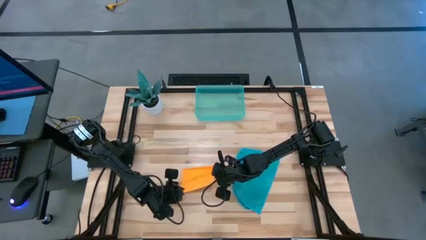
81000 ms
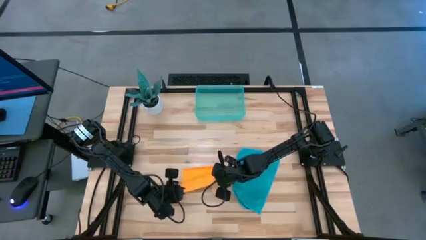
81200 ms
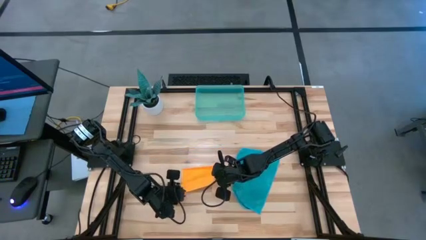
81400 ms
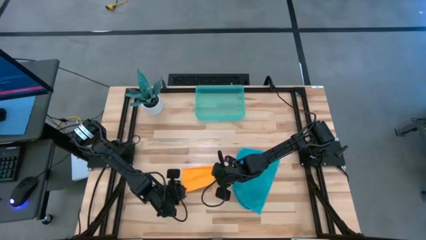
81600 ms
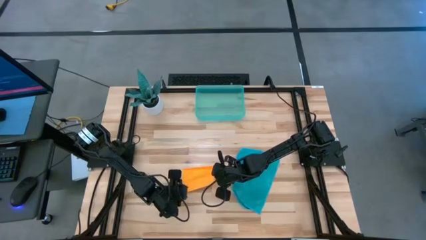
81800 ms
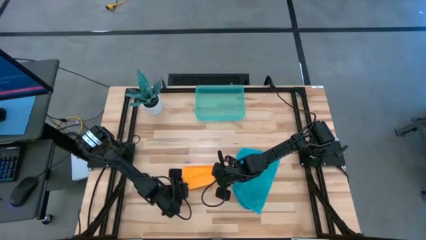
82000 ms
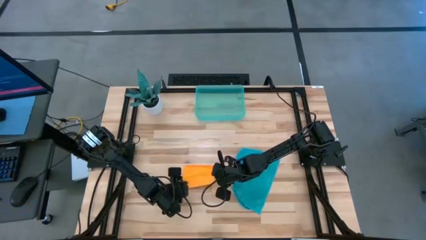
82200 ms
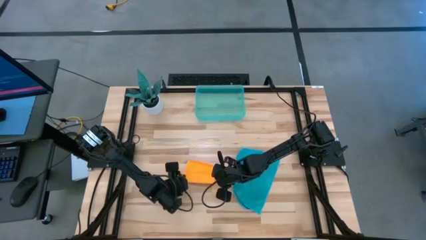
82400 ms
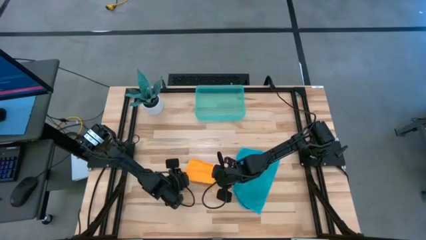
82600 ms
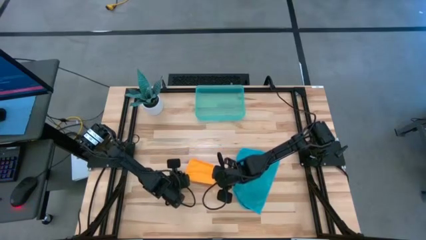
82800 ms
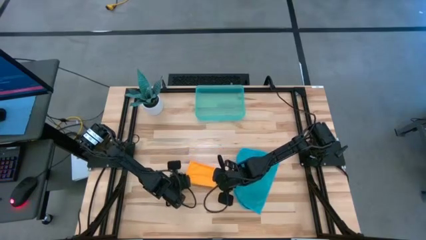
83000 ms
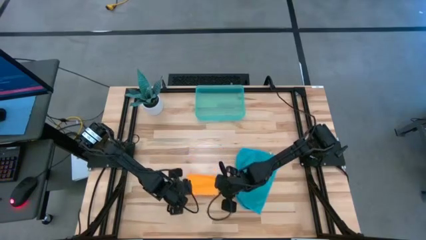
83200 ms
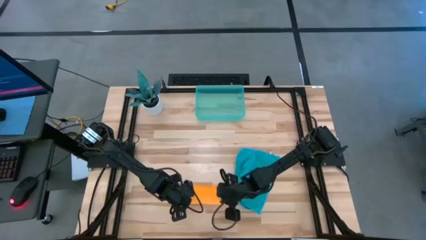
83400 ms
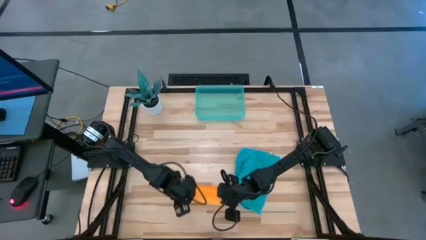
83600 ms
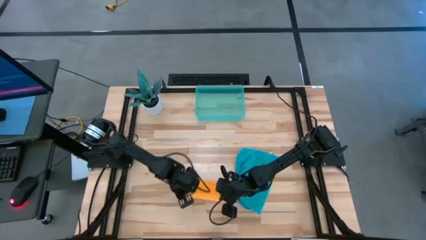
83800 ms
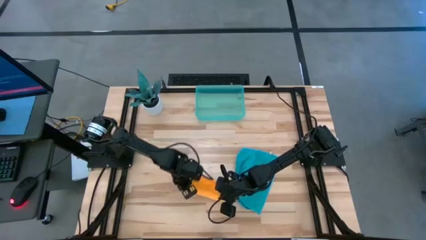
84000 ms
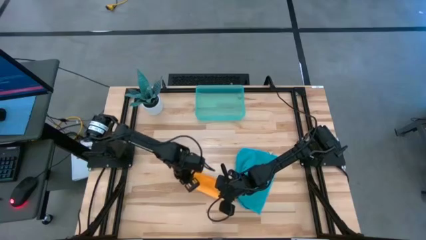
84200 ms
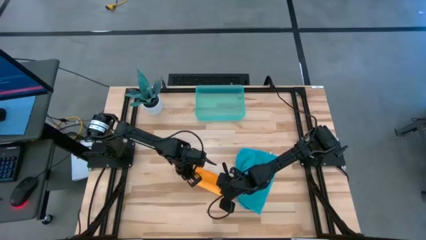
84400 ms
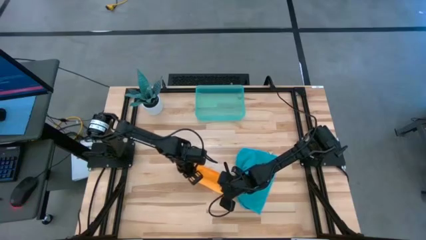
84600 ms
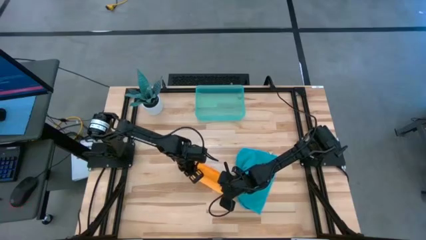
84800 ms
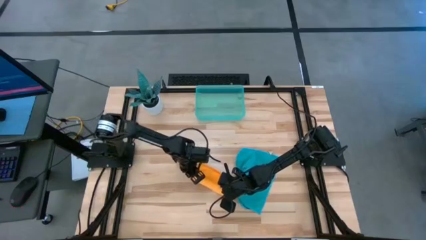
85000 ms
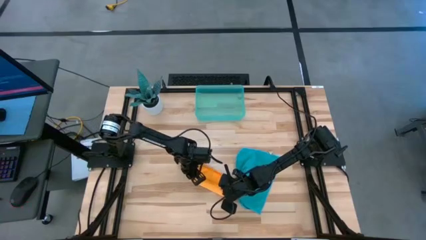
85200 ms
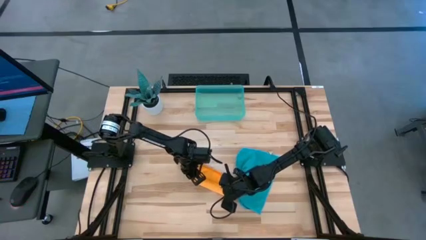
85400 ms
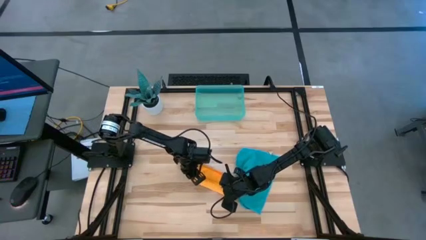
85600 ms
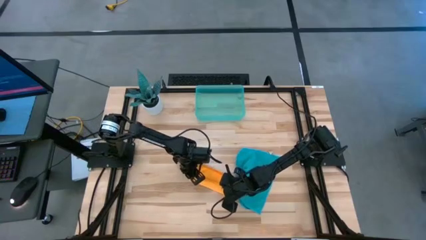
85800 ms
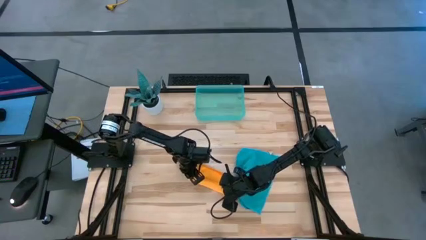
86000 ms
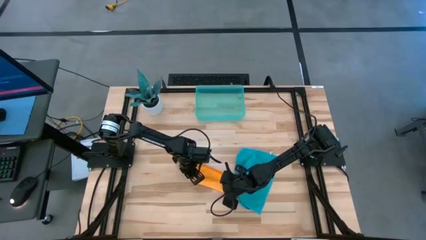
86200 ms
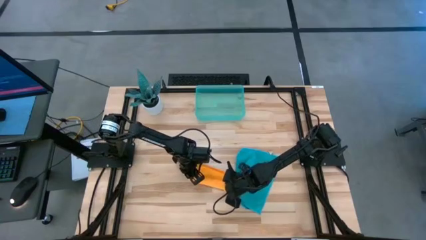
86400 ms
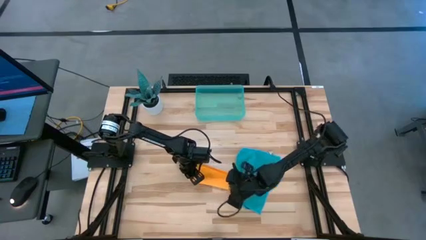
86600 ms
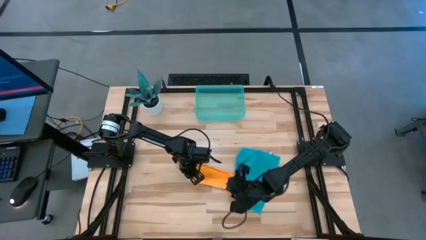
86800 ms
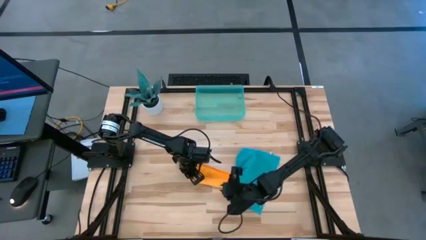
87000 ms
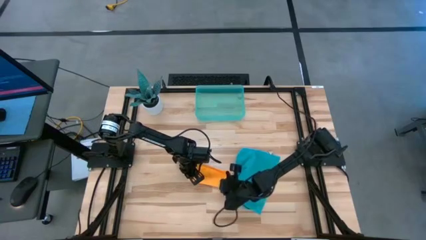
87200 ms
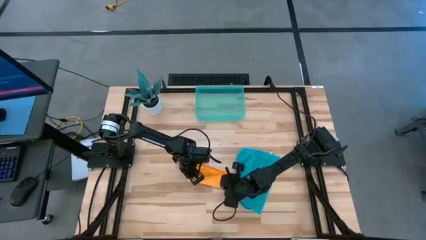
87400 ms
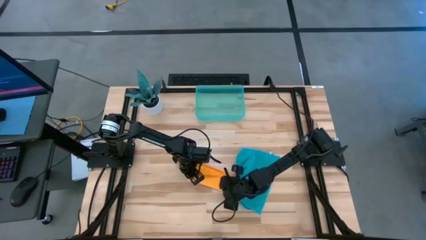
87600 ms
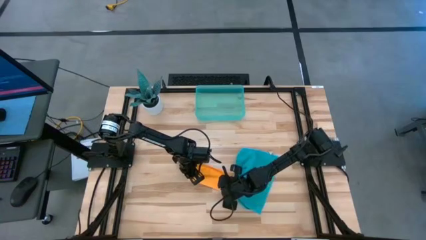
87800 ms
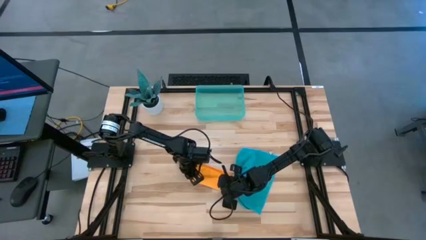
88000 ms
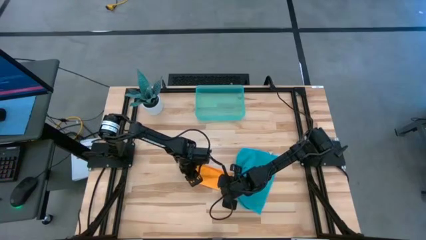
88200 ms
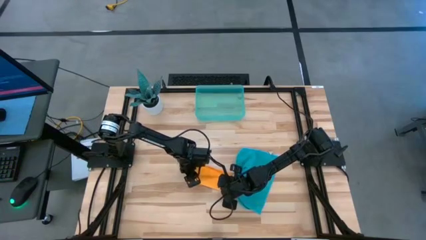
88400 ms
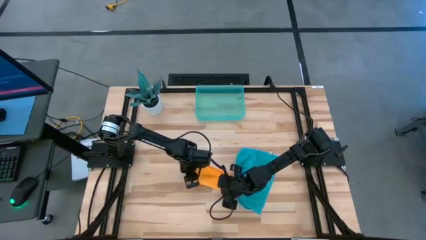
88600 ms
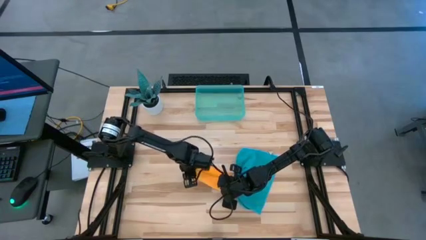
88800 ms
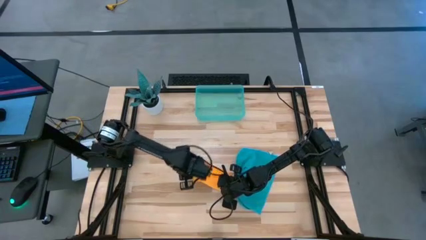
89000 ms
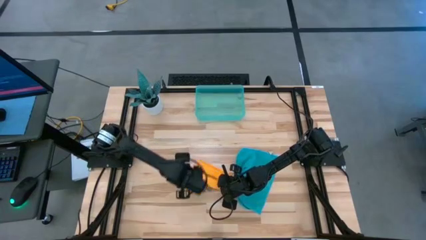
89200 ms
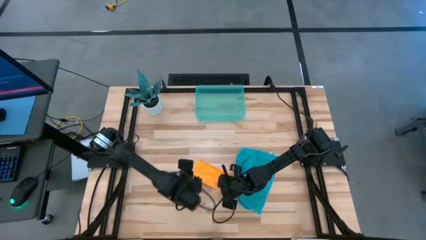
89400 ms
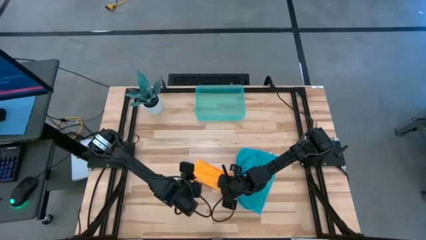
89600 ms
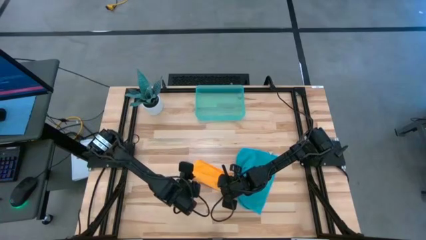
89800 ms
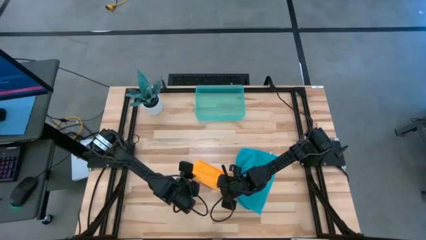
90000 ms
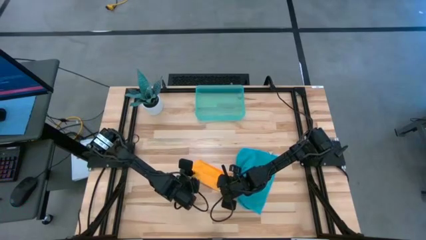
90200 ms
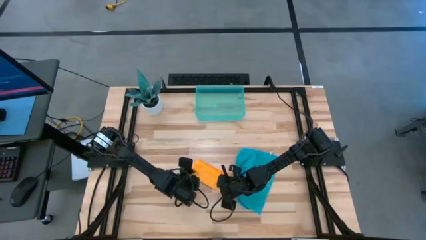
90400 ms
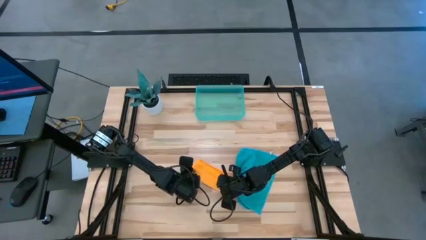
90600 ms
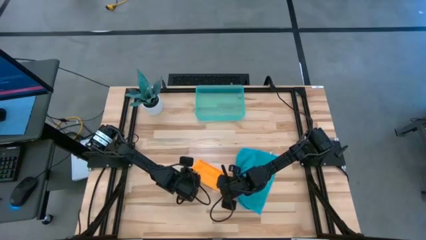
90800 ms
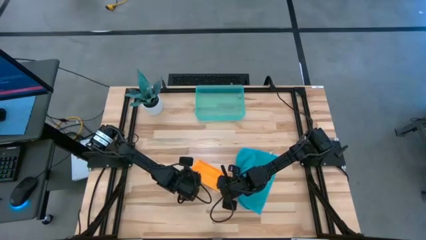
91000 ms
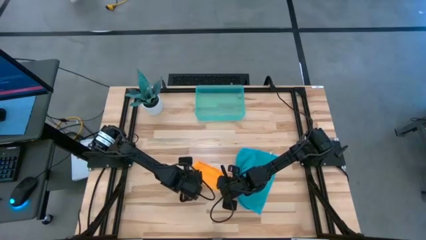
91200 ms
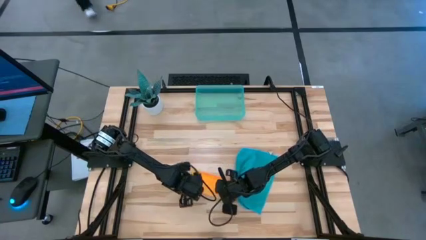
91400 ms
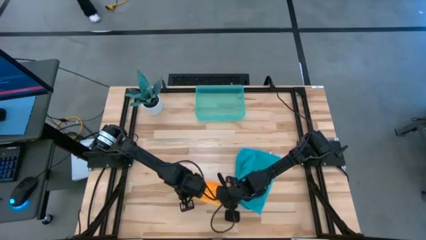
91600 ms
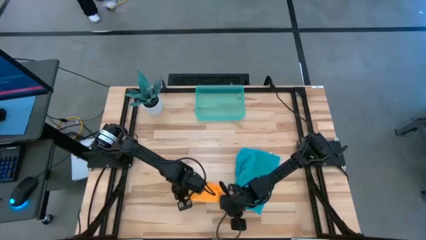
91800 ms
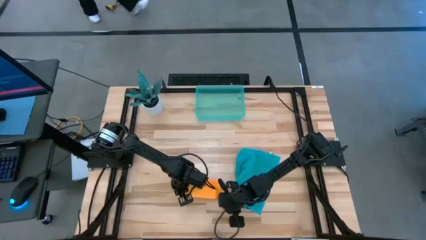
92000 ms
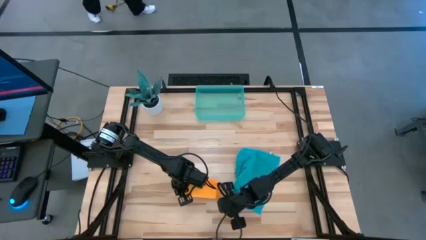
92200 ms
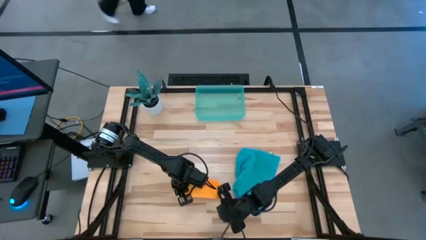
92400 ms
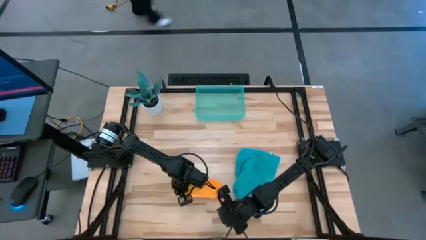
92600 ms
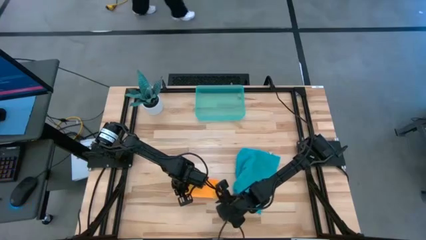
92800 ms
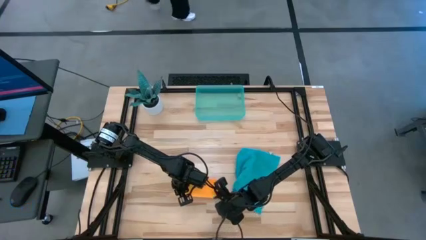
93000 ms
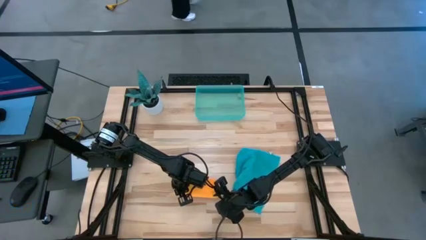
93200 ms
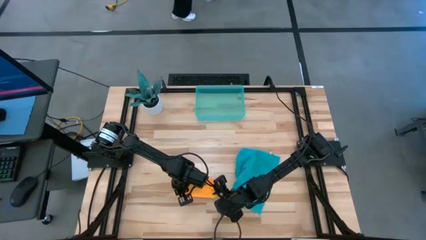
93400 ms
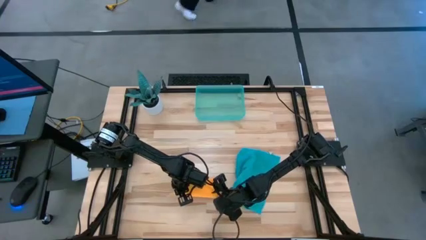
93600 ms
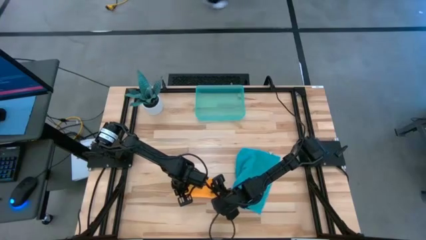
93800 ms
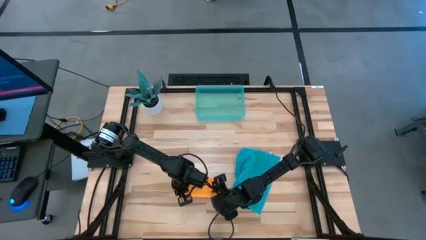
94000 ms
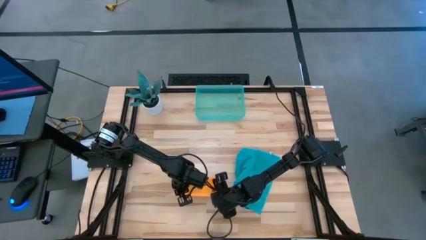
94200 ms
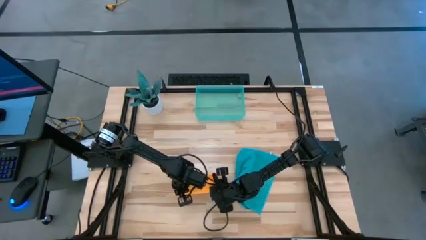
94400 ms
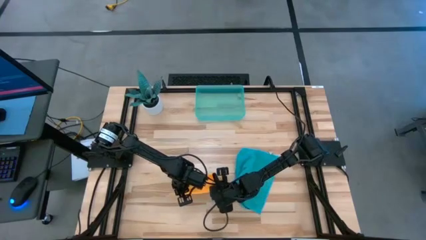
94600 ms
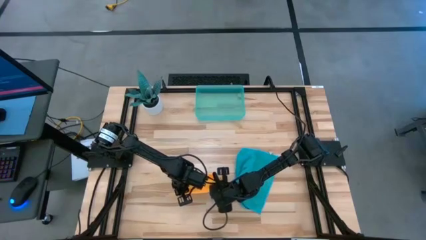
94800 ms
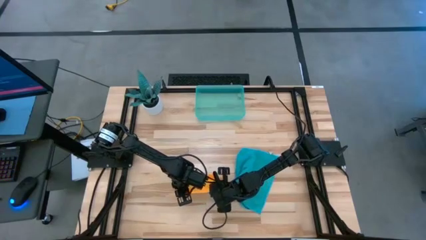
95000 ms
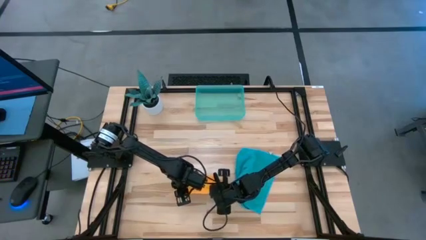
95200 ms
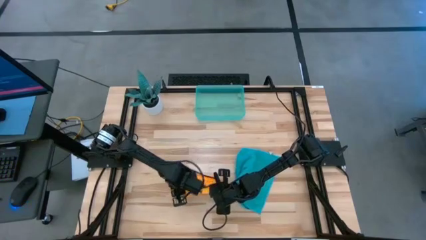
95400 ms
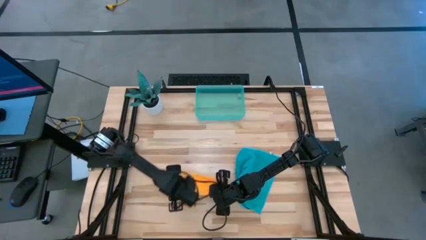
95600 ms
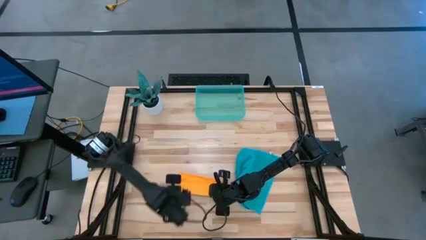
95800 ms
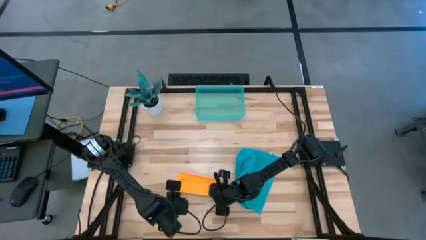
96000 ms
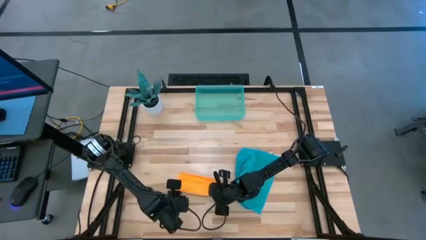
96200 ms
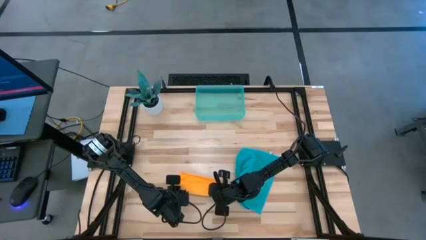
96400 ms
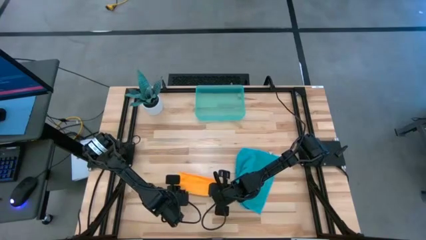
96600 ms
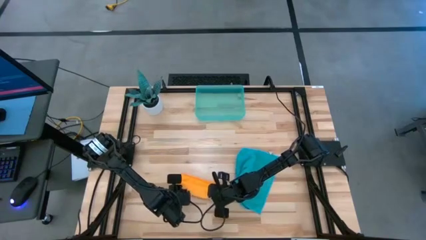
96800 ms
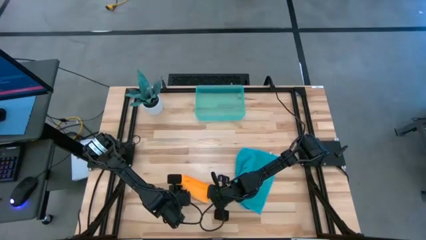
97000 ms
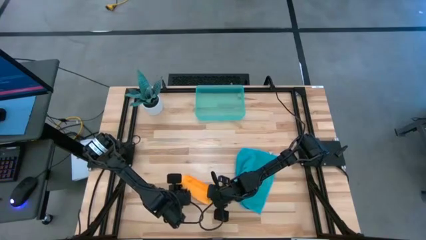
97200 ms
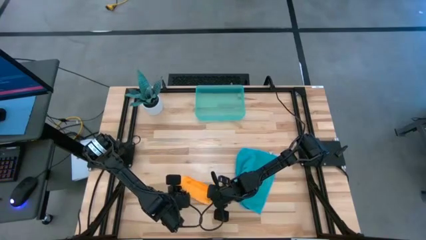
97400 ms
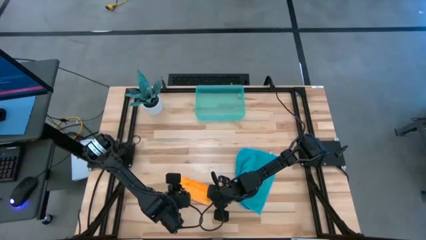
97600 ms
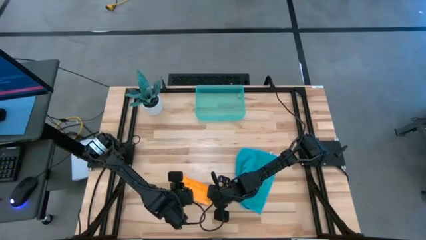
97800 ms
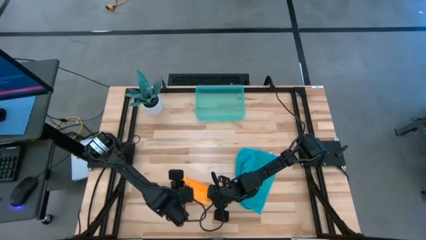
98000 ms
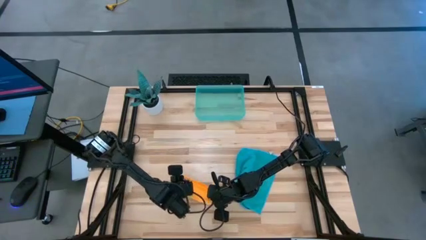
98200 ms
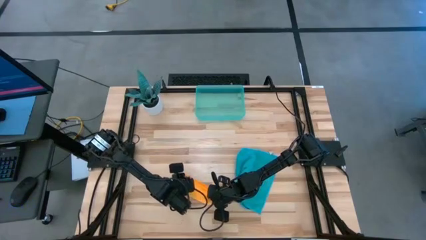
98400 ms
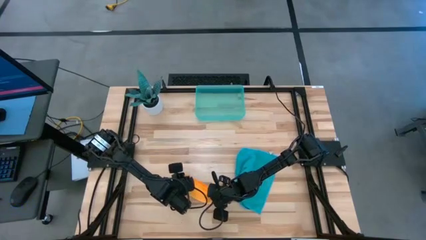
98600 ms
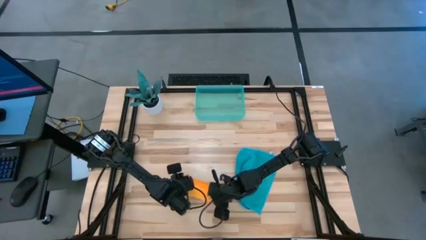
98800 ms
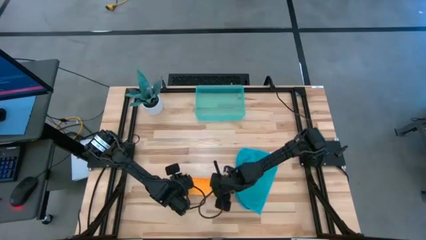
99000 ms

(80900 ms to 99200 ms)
Task: Roll microfiber towels into tight, uniform cylinder then place into a basket
Roll the yellow microfiber cloth
